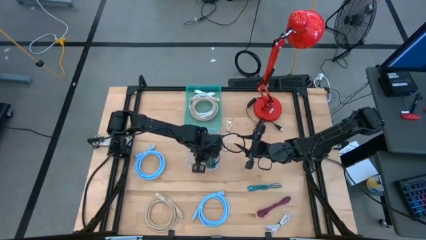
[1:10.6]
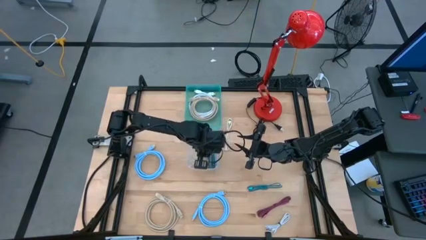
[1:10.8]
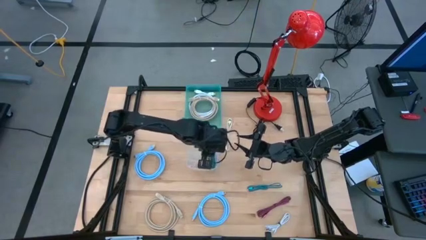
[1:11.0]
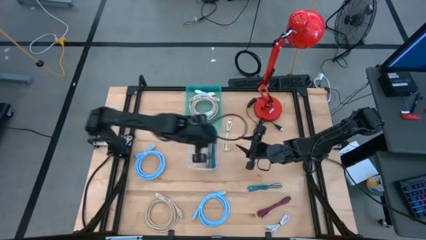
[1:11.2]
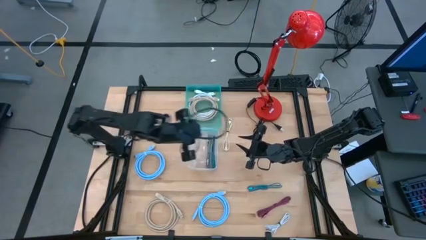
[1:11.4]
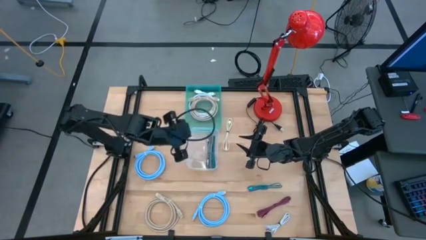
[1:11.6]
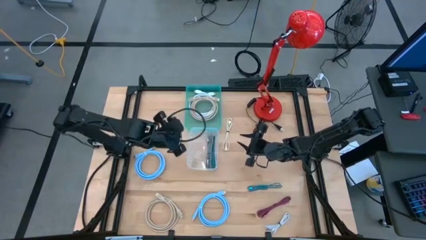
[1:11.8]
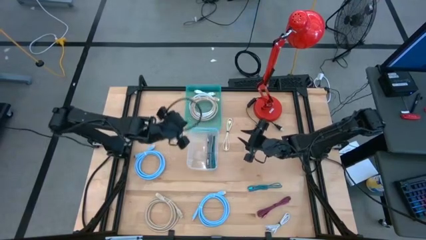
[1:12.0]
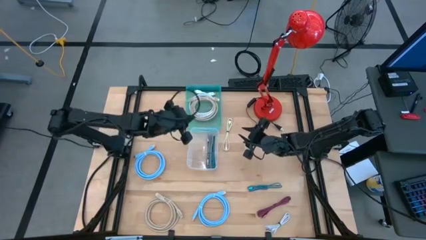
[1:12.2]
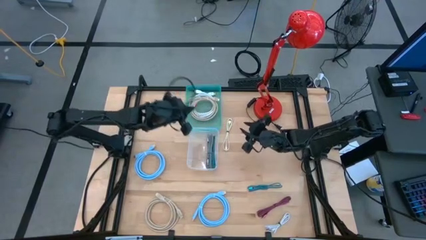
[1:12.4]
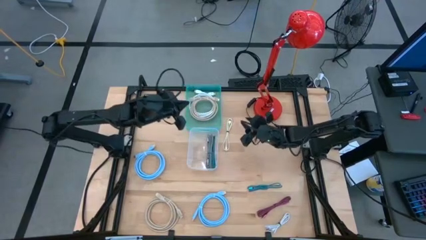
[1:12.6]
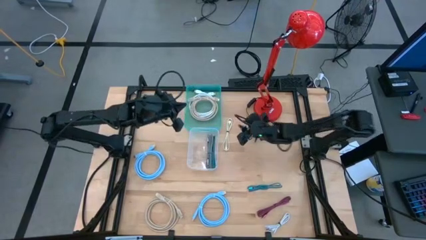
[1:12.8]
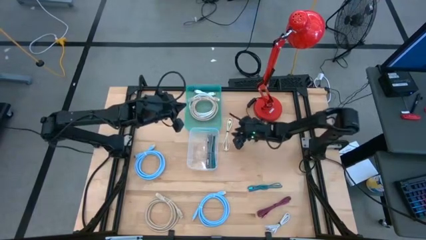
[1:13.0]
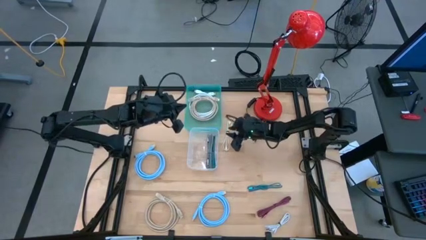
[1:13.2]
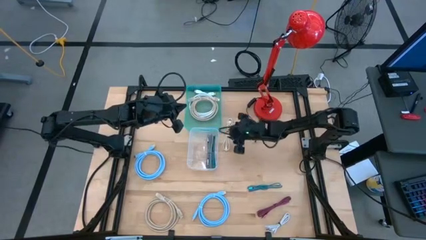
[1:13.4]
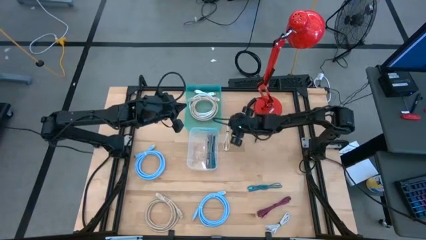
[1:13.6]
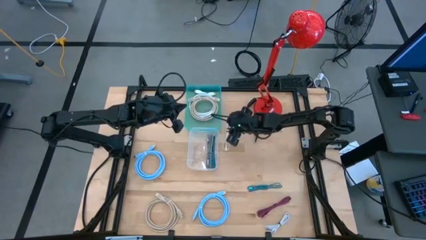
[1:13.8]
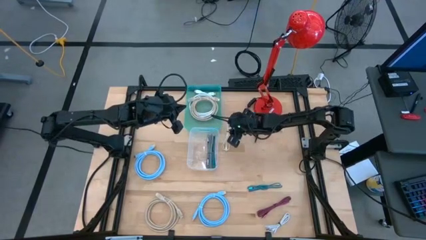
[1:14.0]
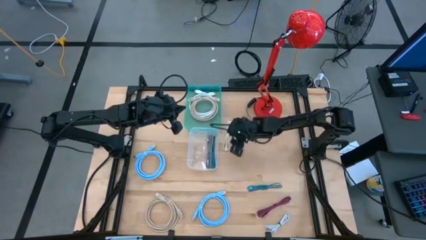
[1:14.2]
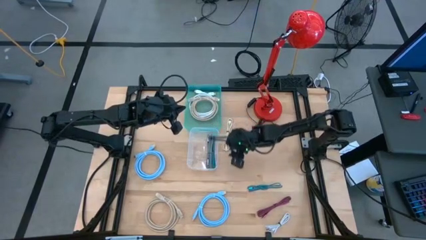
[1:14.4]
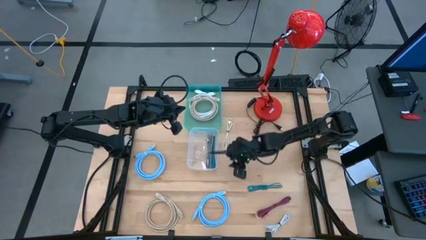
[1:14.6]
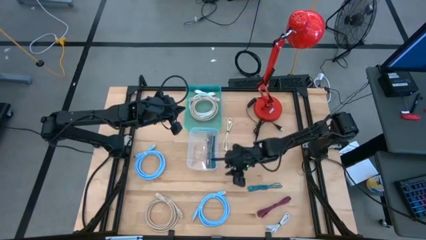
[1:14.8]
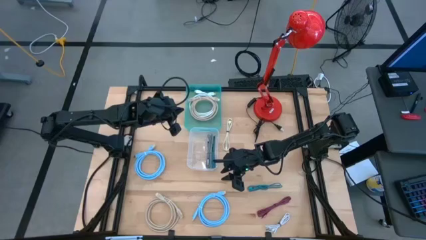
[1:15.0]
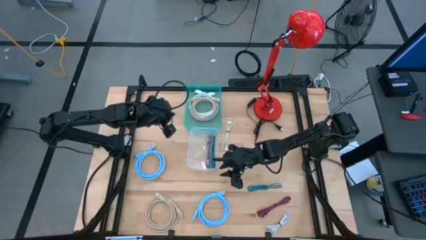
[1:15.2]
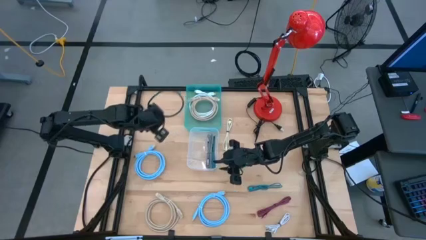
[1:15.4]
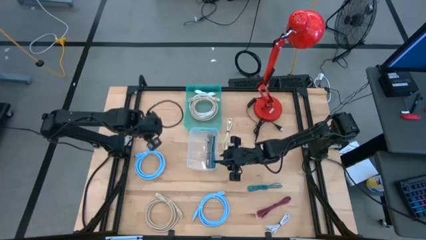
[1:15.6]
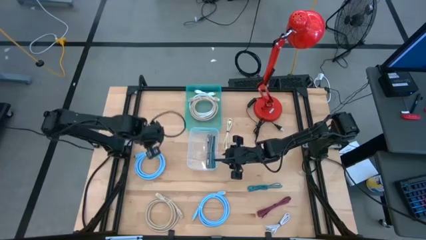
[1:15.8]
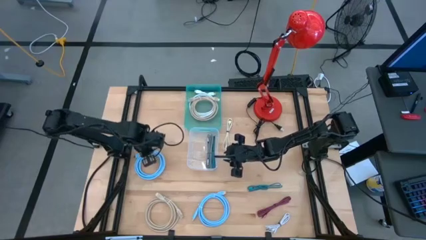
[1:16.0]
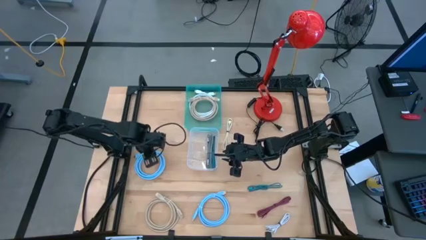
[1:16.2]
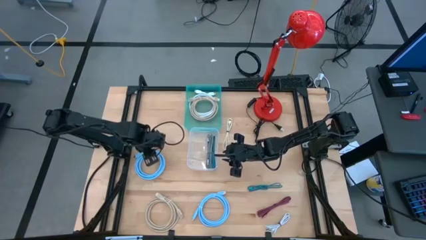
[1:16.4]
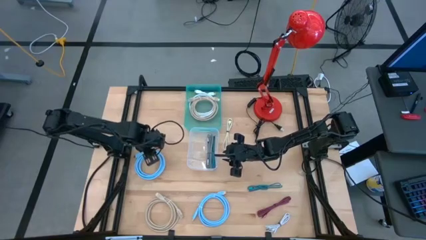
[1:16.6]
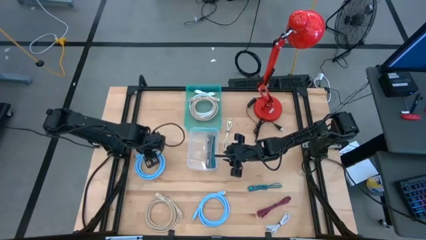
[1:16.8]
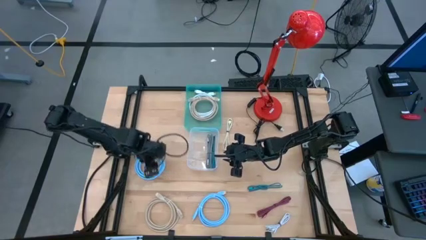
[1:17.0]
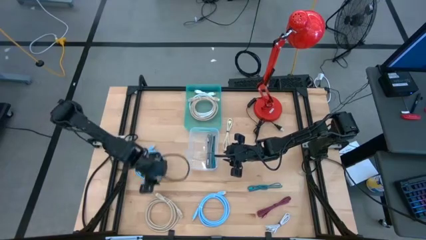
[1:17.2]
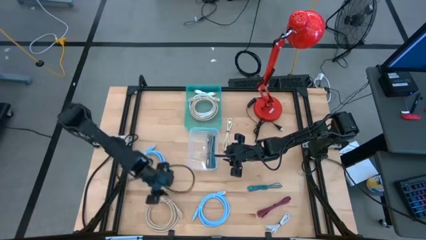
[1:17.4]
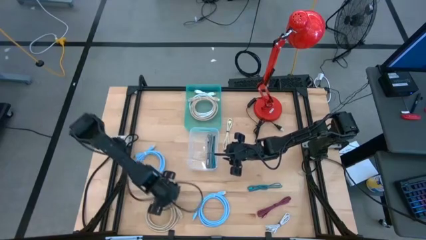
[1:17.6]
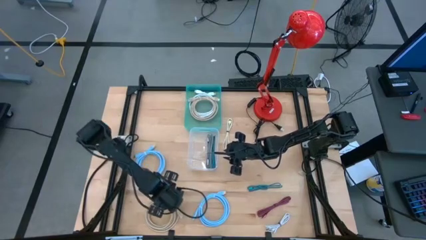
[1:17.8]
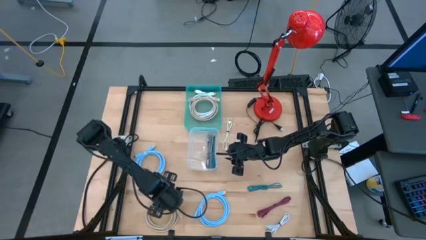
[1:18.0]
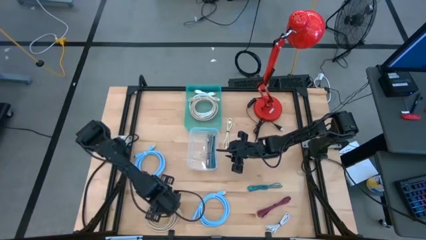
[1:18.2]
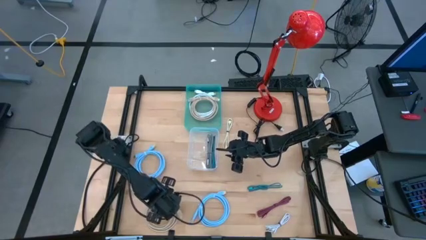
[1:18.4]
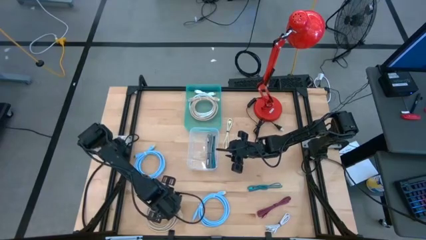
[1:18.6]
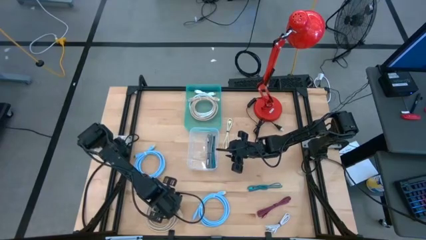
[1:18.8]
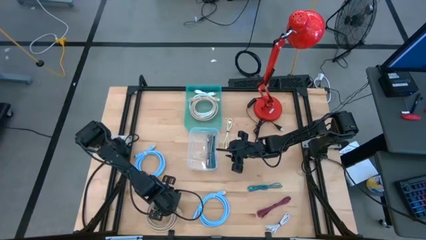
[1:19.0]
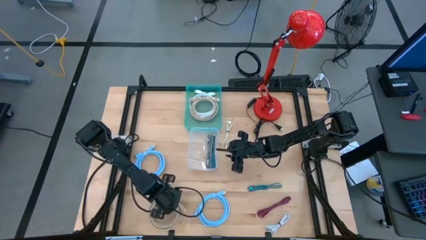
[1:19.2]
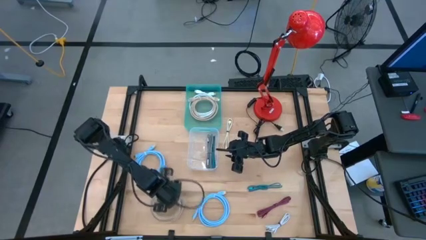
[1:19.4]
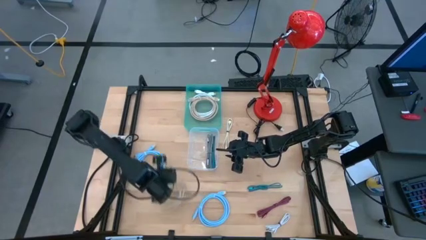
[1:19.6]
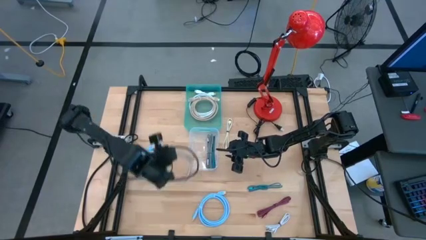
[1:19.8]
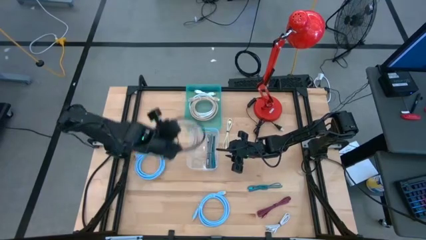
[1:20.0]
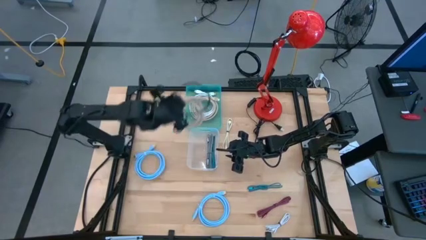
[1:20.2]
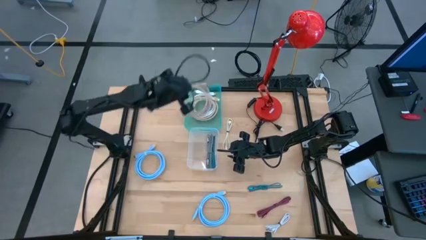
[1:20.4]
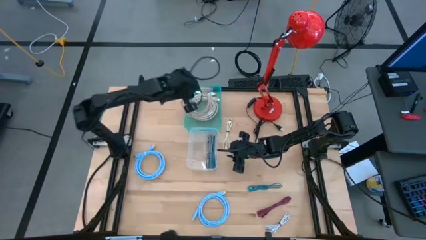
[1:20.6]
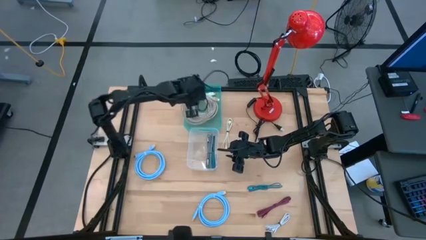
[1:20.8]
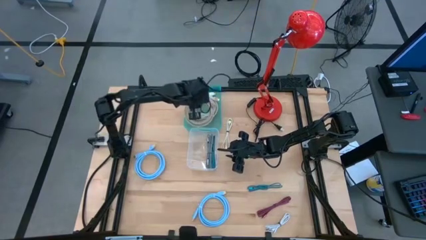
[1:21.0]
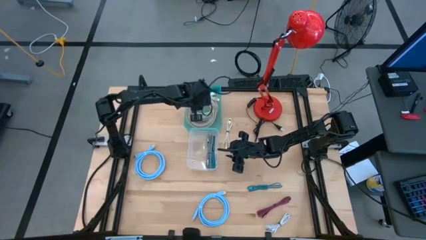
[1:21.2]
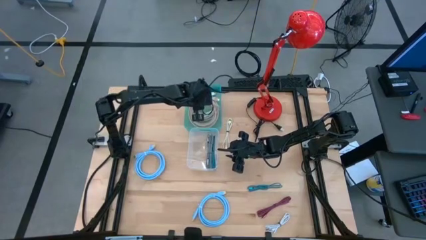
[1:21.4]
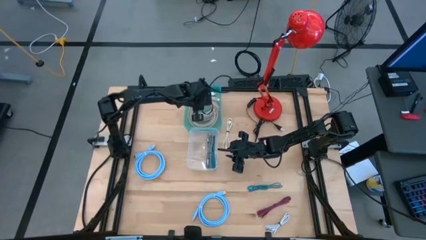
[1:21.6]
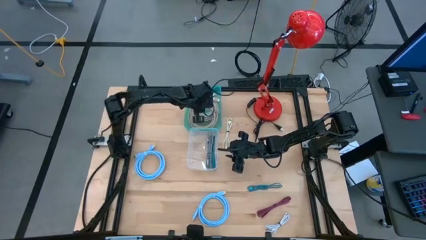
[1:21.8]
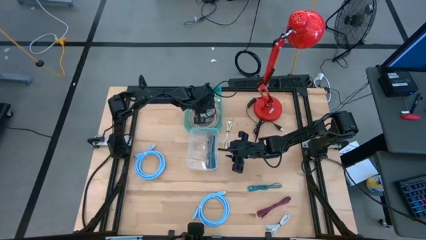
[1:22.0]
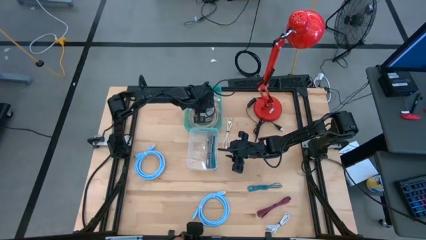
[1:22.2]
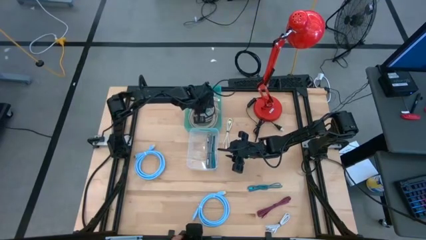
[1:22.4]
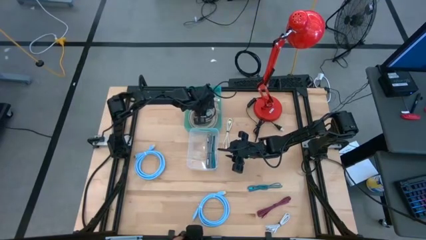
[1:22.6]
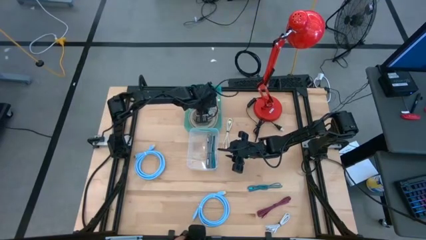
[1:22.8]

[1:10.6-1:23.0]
Task: Pick & Place USB Port
Put the brown rolled USB cable into the blue bin

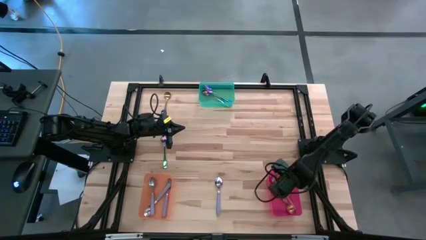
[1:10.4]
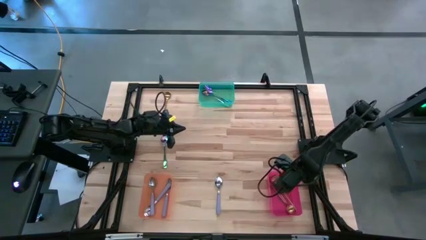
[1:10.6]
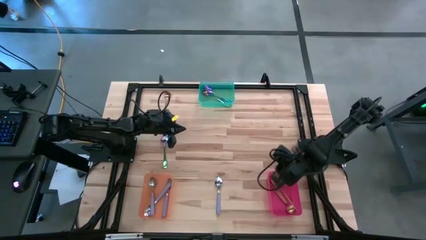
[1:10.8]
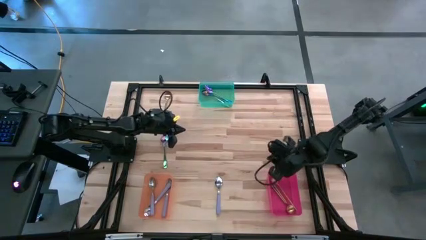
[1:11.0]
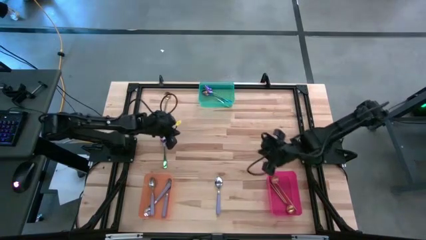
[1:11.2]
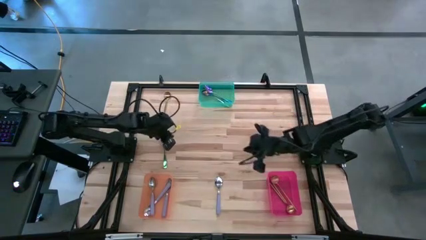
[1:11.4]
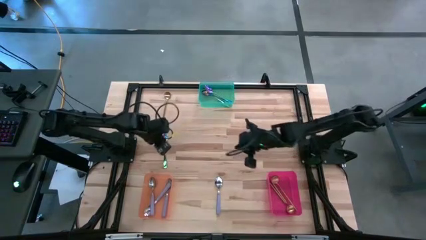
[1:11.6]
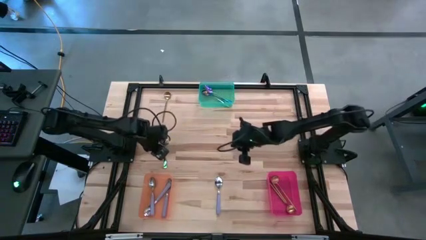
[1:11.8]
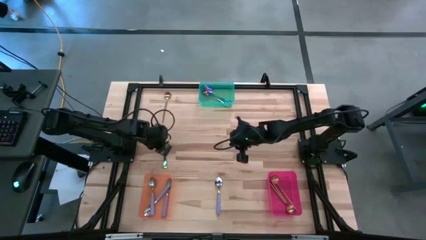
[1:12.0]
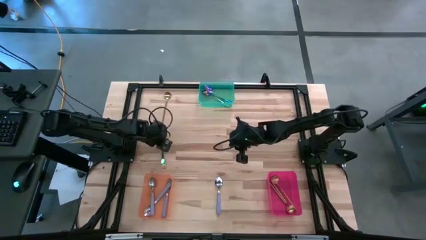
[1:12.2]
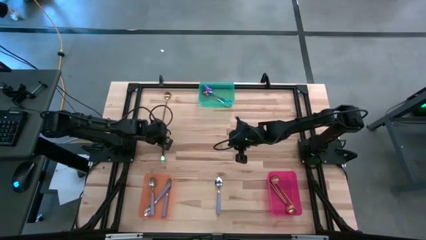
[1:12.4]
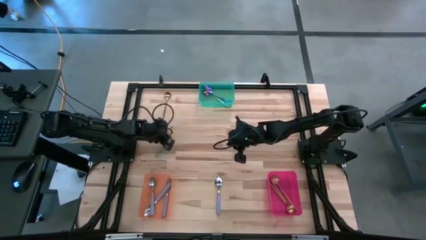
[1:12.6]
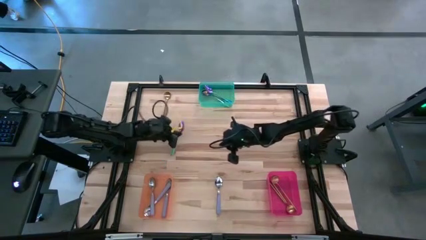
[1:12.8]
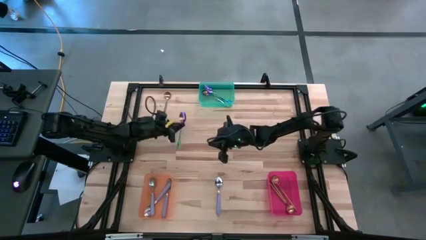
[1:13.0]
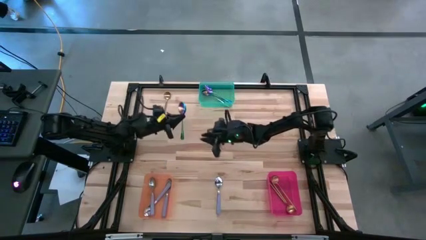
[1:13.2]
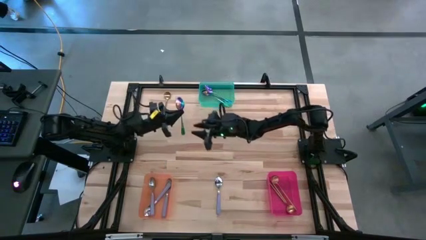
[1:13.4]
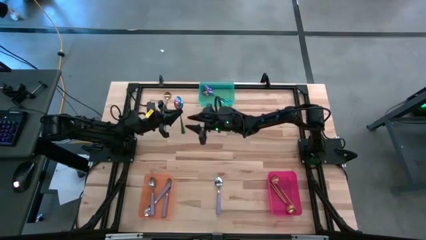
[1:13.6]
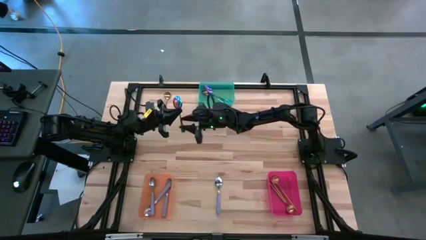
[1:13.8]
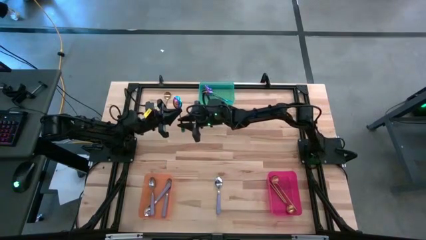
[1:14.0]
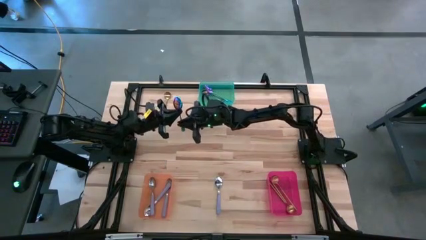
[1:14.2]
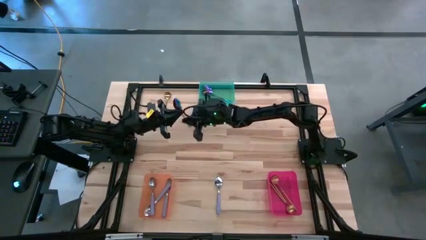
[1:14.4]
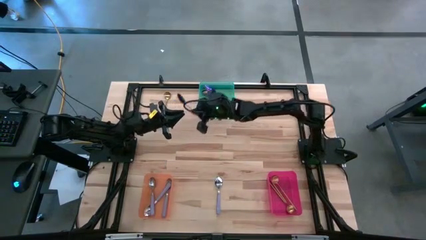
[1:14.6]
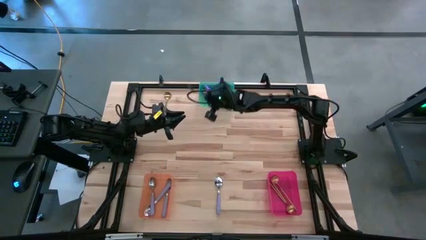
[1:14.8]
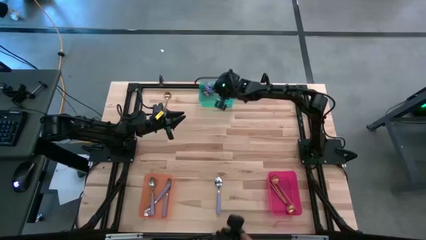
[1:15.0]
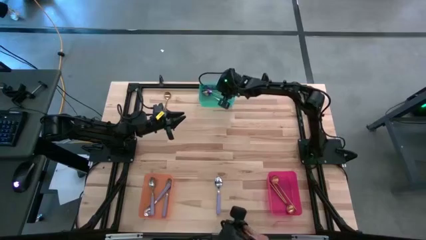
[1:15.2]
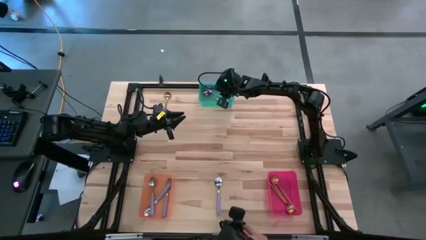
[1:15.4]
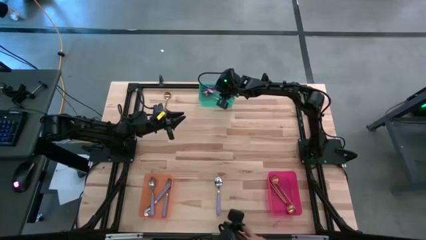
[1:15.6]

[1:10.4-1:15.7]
Task: Sort silverware by color (type)
Put the violet spoon into the blue bin
